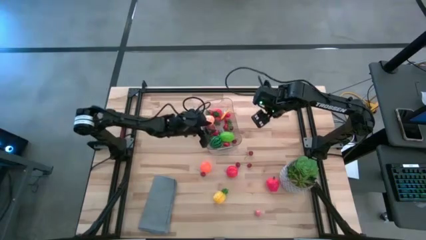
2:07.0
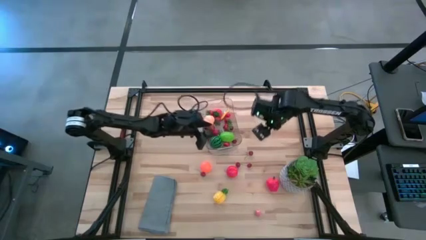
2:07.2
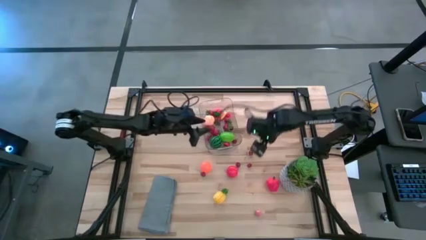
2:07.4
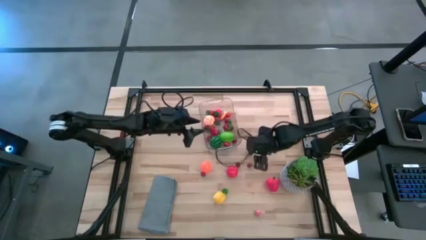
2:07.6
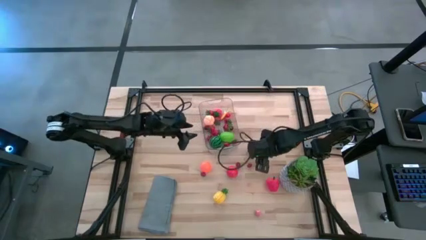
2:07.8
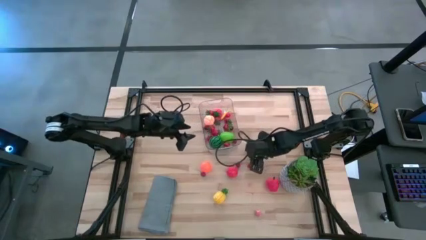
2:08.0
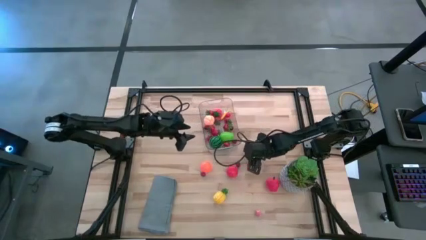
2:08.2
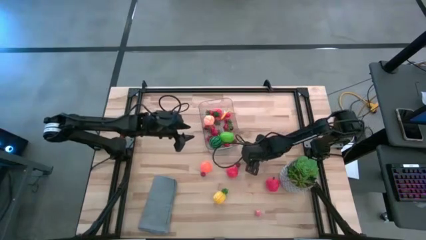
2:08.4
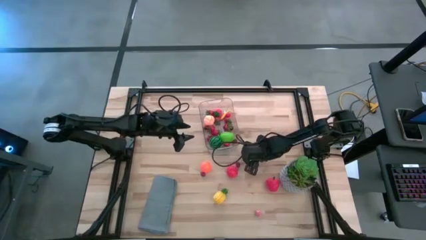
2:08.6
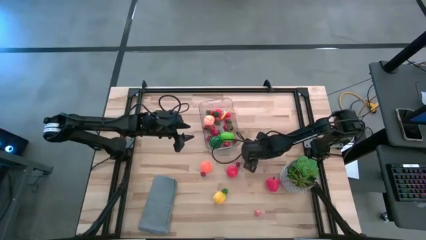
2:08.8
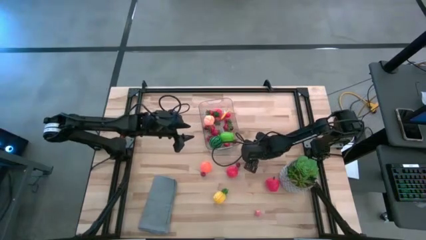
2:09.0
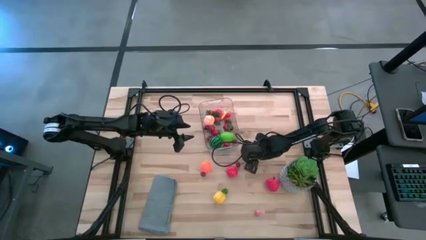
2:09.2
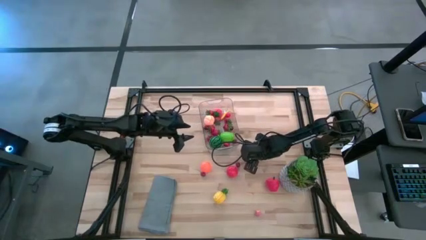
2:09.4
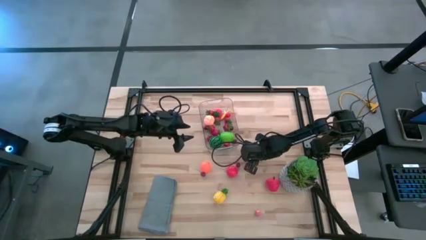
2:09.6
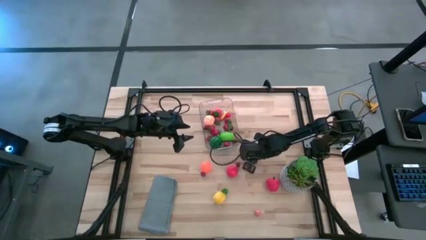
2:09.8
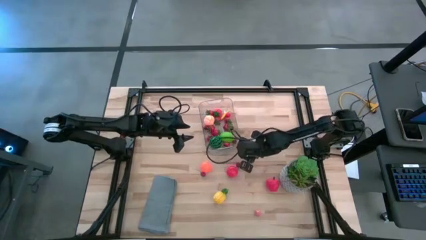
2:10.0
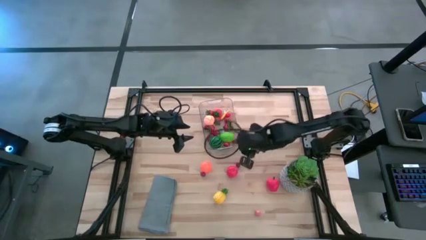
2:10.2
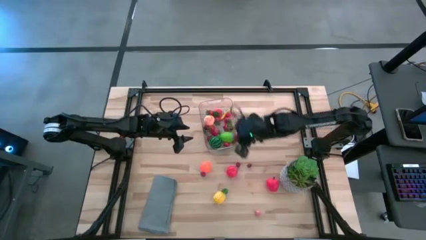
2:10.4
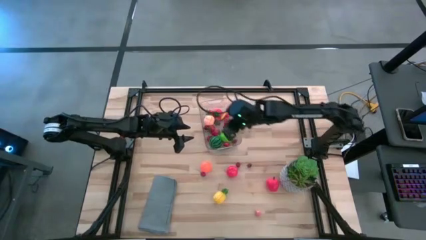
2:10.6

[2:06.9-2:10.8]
Task: Pick and placing Produce into tupperware
Put the red cherry into the transparent container

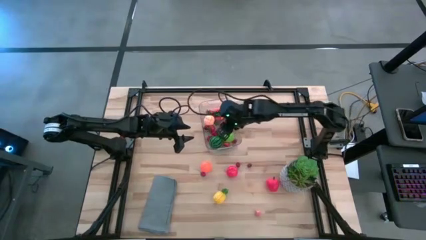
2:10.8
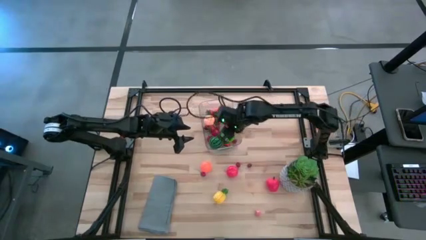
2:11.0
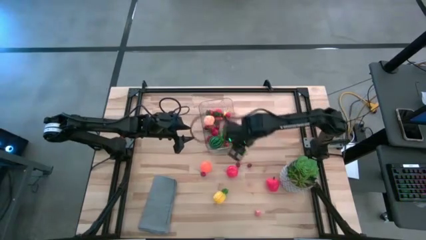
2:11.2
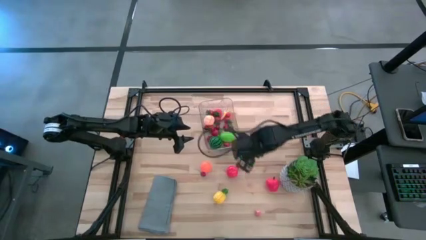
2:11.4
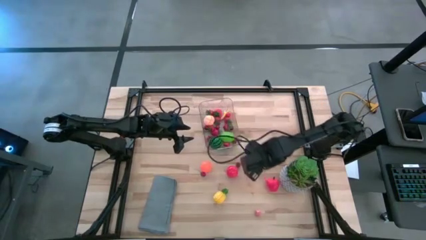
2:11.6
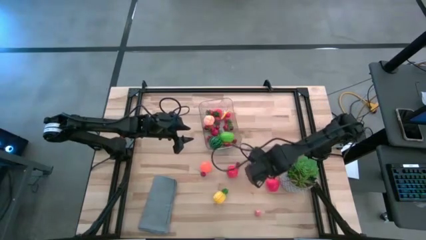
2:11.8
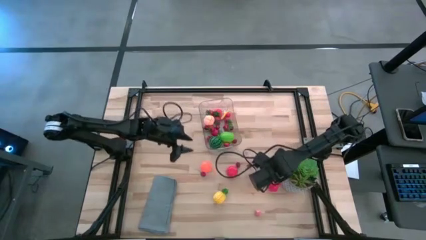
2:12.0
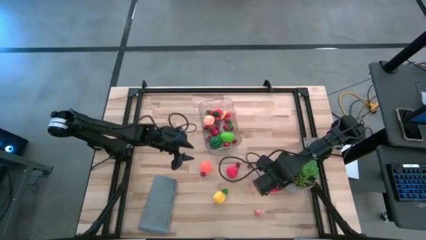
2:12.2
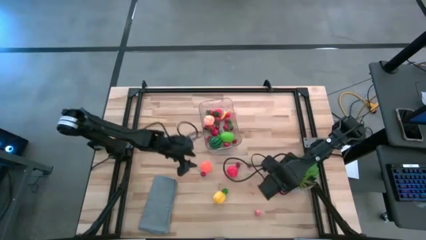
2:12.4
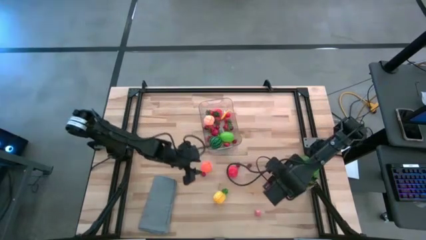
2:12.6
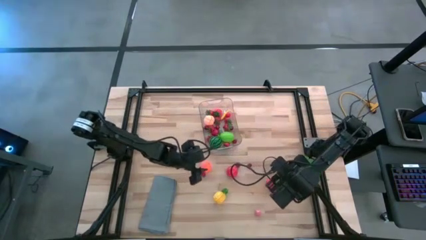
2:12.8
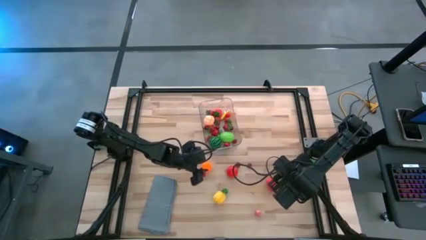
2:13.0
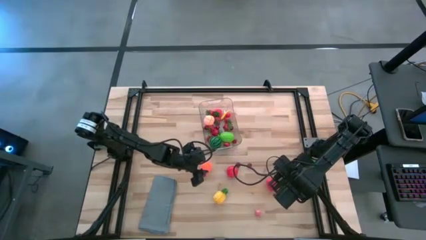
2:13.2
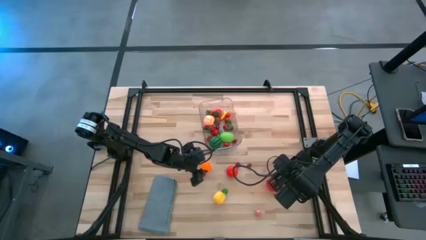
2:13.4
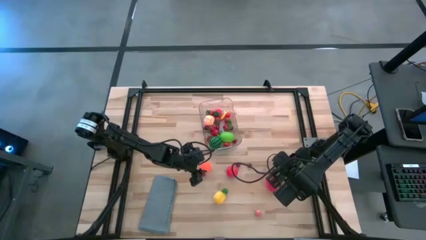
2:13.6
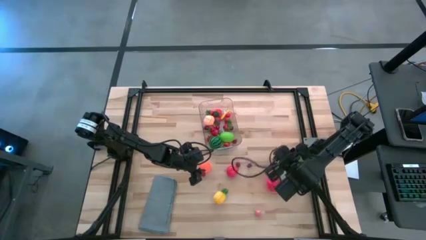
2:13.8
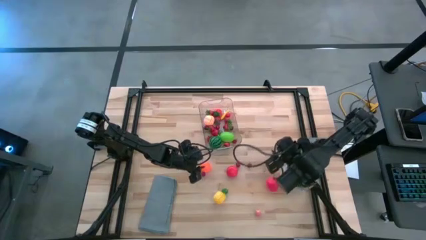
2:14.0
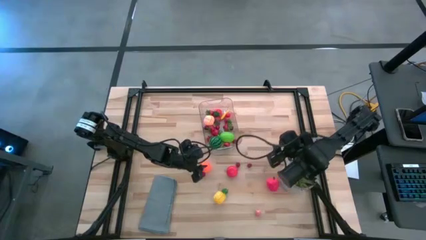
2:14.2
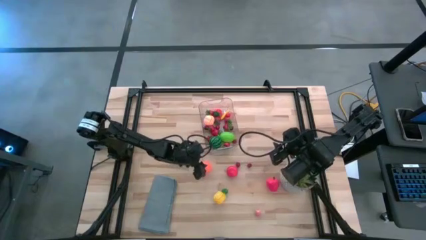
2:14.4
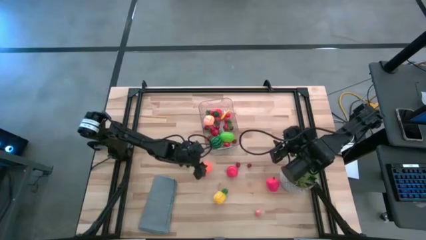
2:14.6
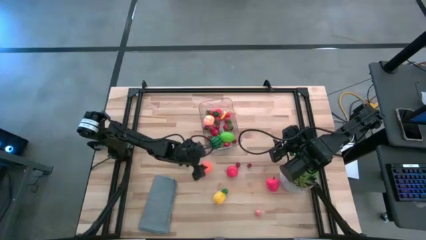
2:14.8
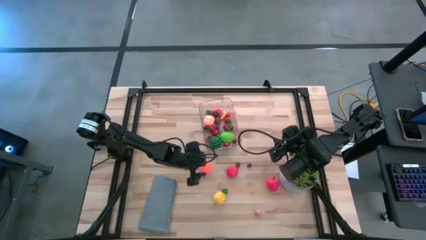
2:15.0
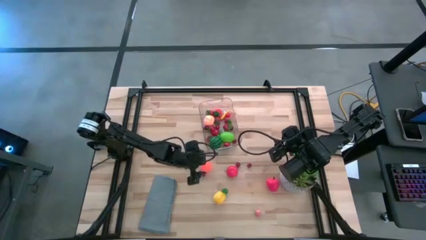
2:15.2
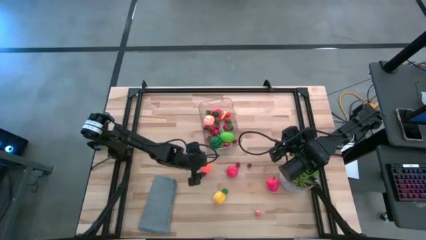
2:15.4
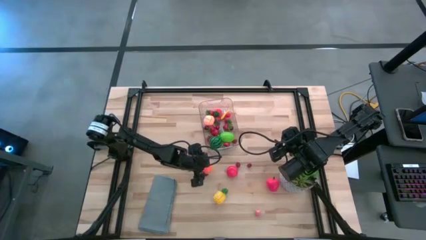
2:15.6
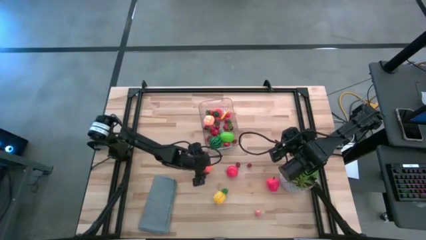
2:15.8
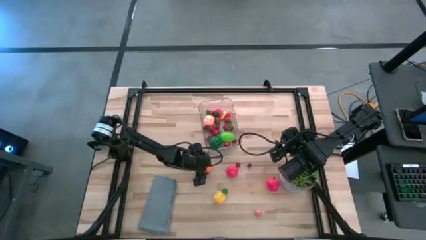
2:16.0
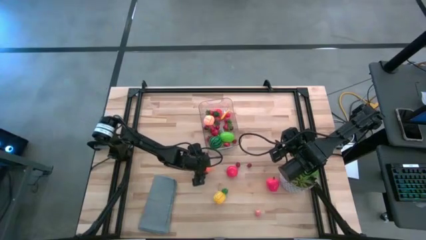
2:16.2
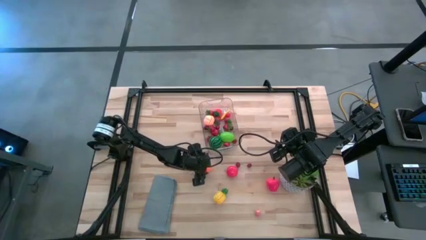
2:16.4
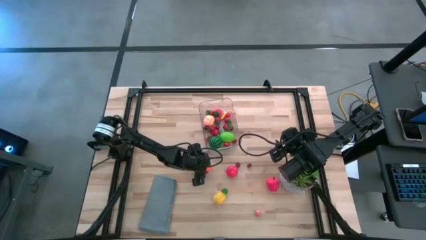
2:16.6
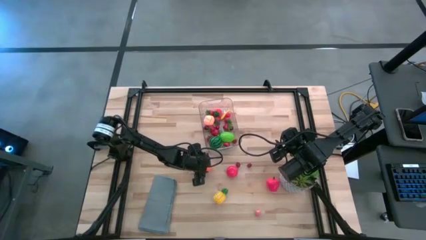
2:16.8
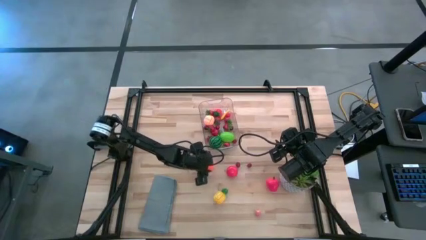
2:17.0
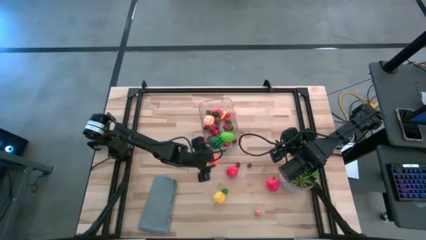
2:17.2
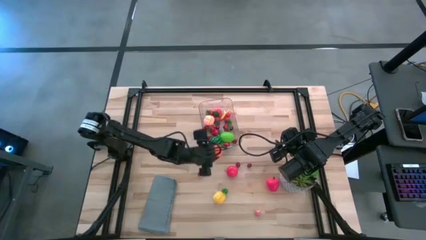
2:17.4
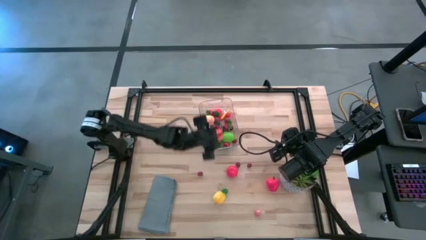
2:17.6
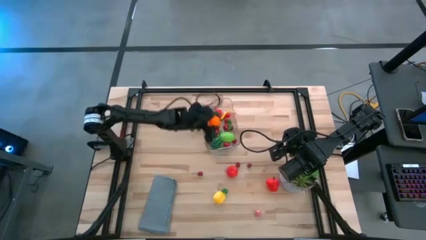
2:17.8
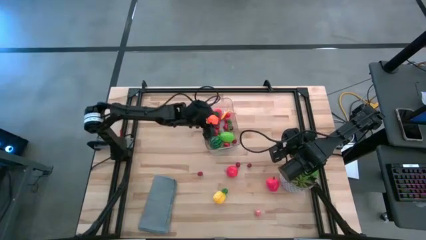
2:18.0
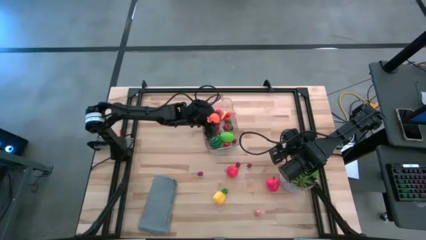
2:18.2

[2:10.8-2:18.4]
Put the orange pumpkin into the transparent container

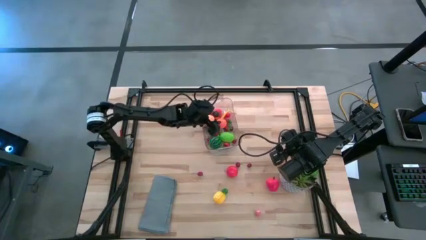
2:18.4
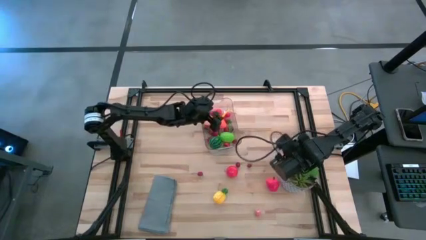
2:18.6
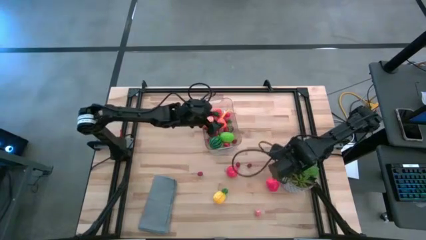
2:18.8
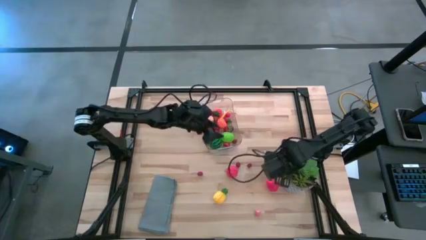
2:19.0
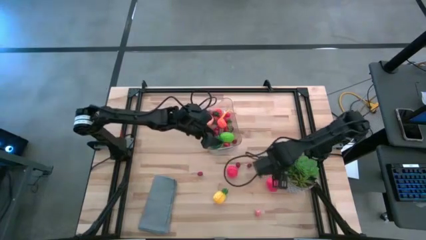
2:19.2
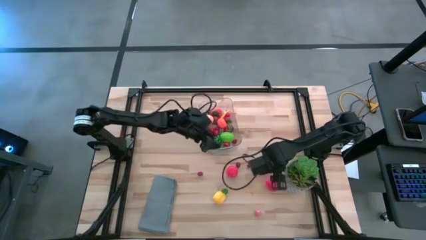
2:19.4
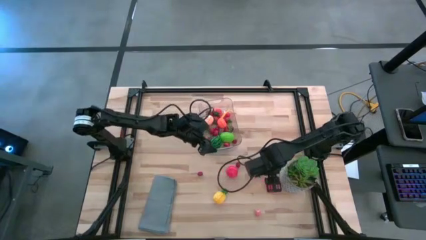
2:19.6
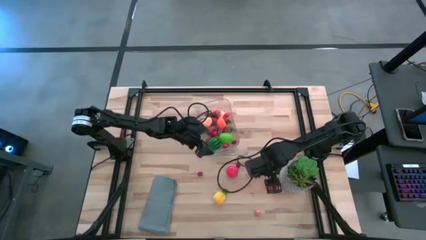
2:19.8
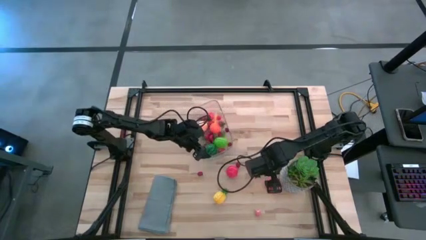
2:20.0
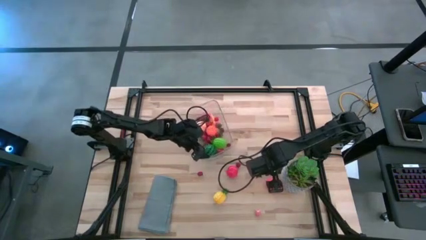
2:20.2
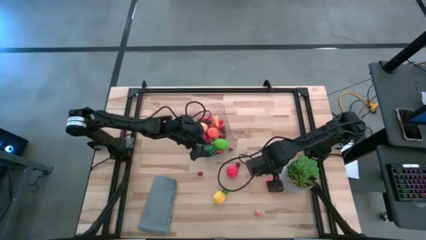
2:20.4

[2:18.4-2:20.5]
Adjust the transparent container

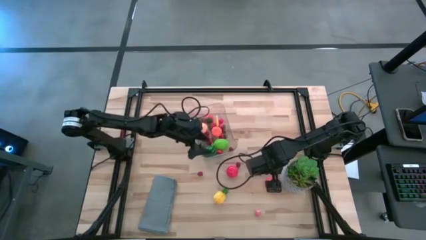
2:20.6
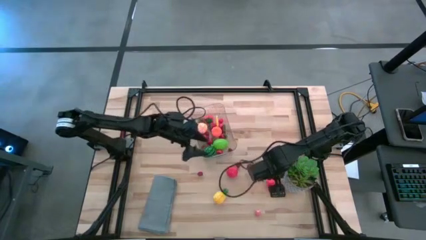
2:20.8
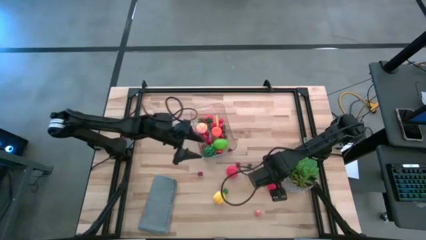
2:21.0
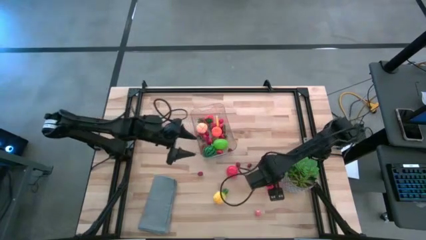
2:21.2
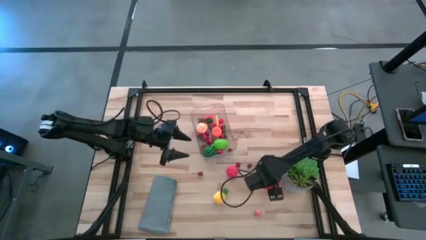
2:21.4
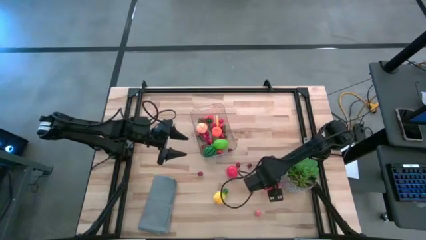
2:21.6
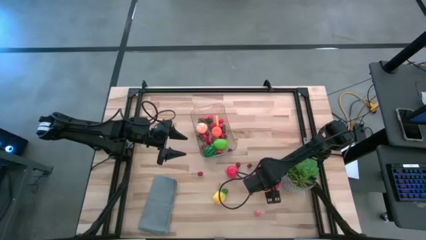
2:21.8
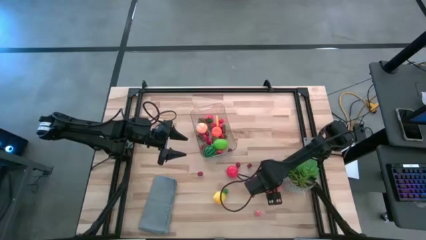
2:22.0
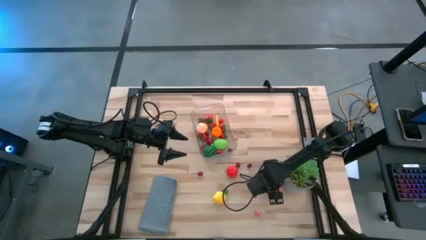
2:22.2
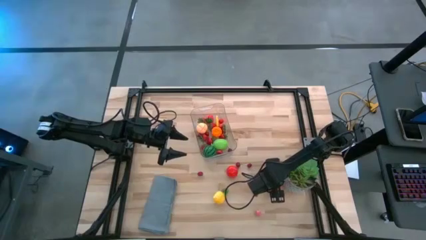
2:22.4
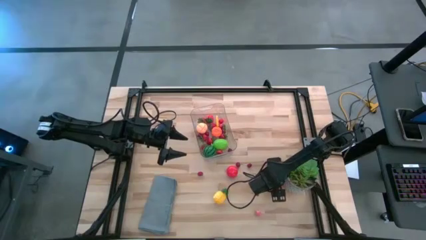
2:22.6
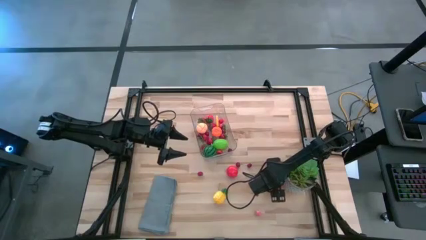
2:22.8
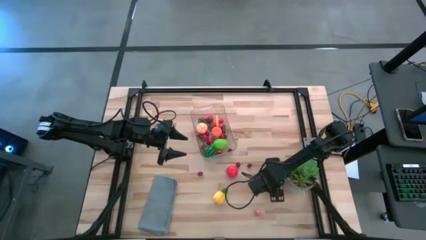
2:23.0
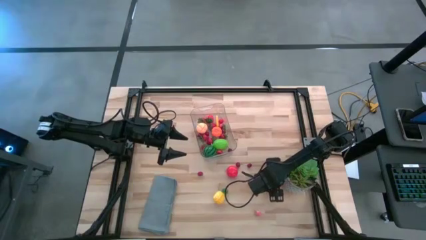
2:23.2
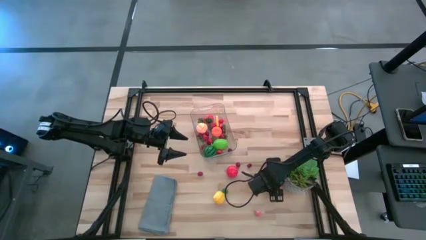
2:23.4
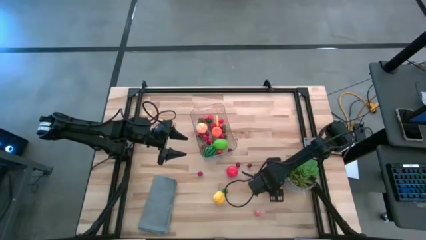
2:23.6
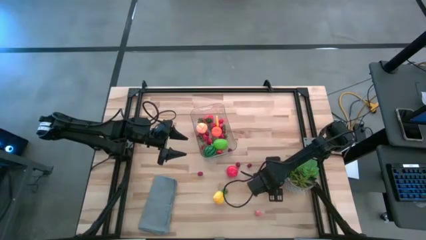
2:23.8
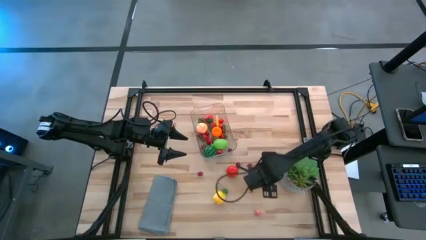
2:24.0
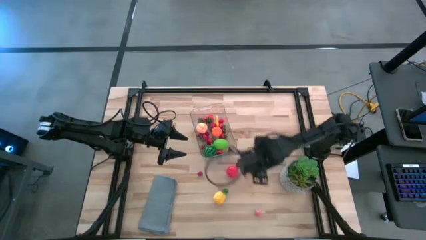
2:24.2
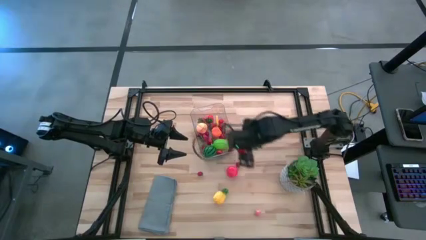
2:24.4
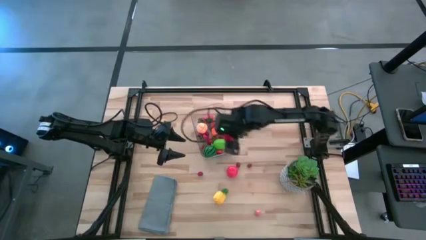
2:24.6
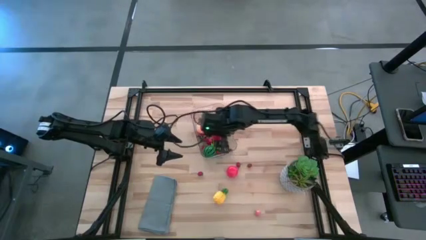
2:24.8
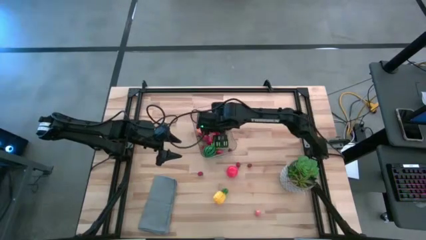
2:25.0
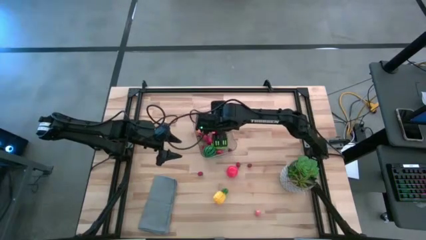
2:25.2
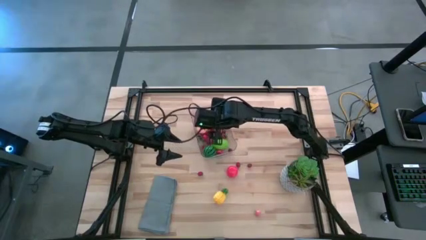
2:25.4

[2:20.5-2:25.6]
Put the red apple into the transparent container
